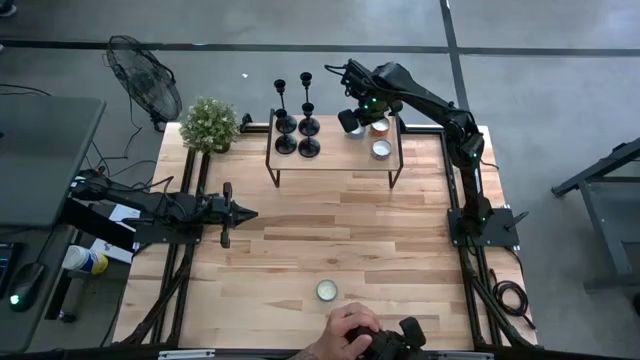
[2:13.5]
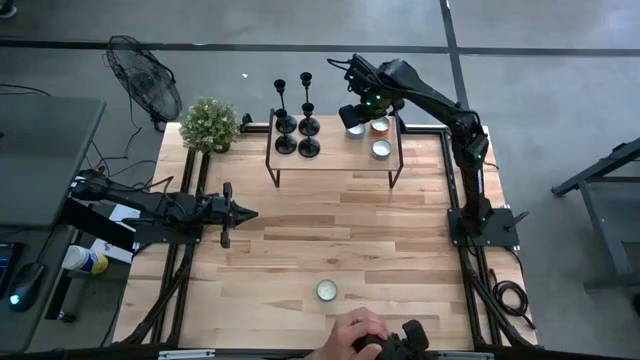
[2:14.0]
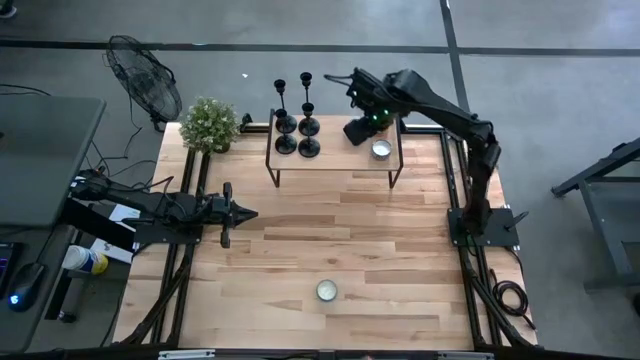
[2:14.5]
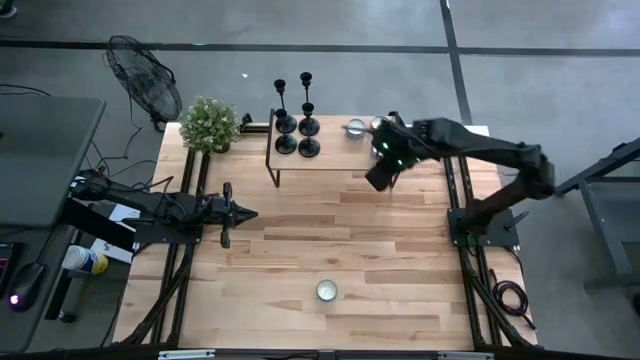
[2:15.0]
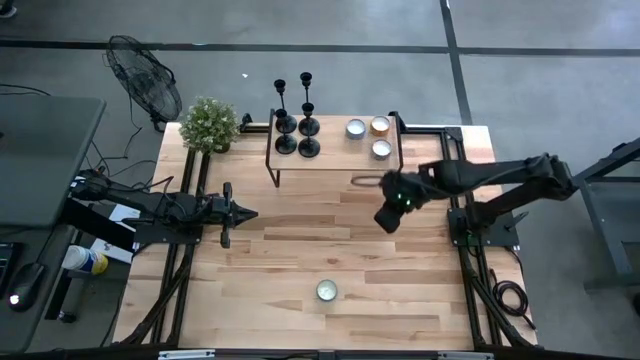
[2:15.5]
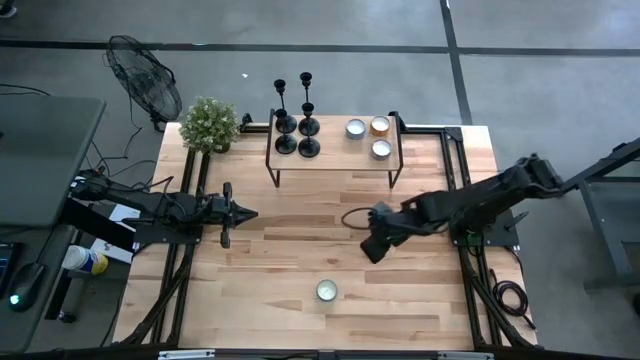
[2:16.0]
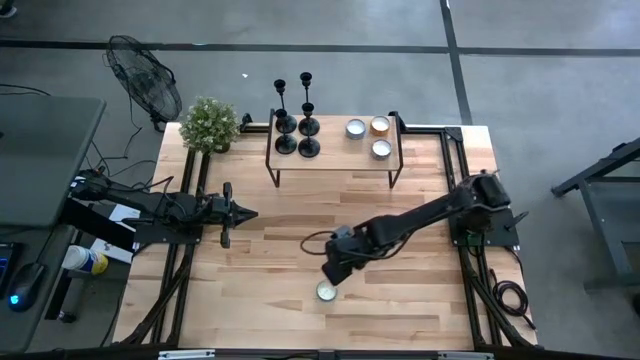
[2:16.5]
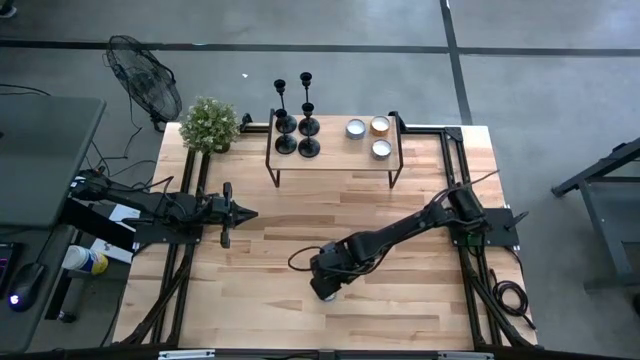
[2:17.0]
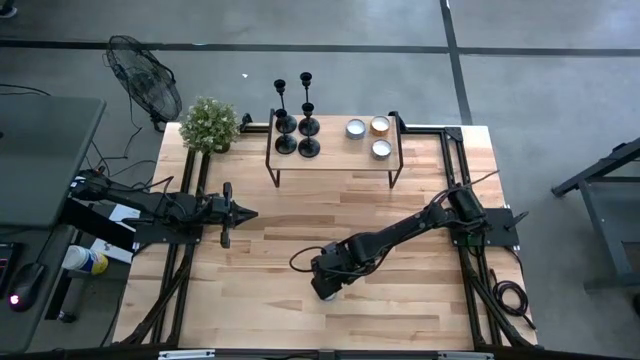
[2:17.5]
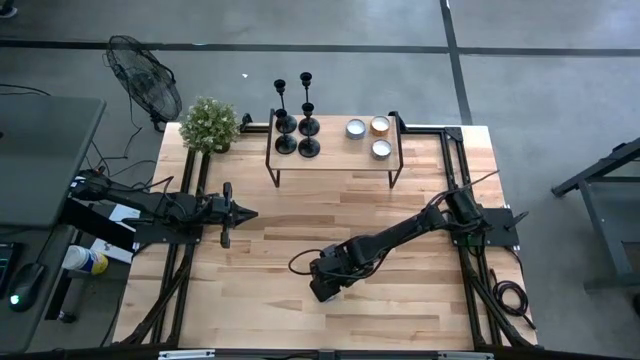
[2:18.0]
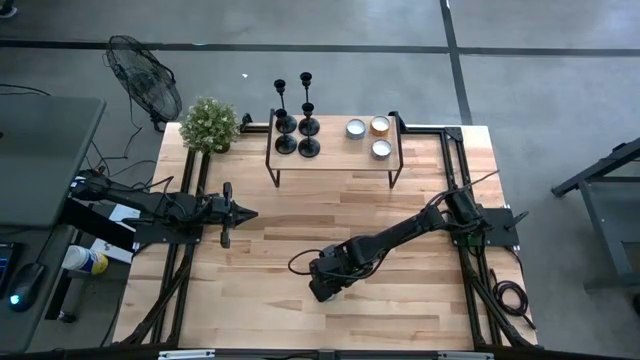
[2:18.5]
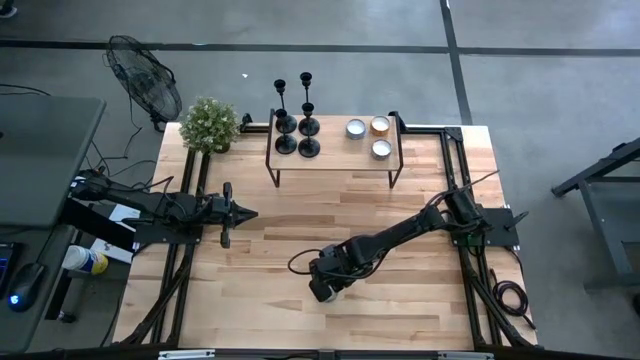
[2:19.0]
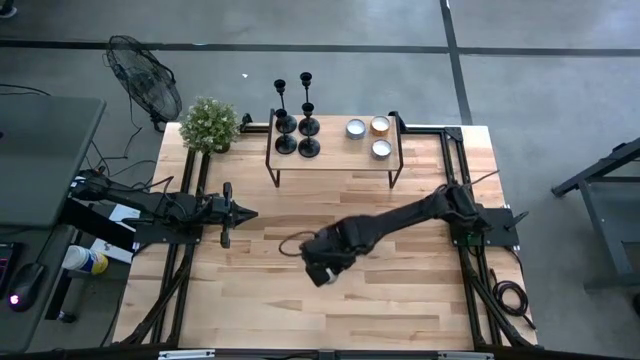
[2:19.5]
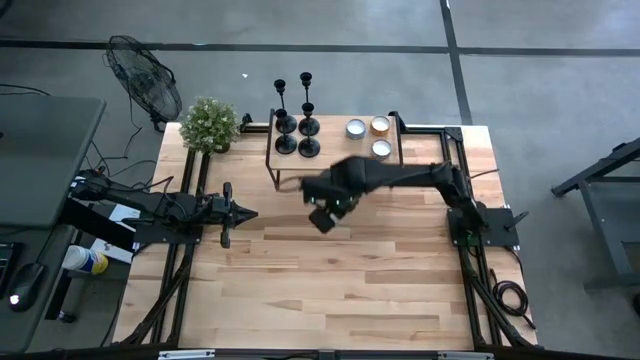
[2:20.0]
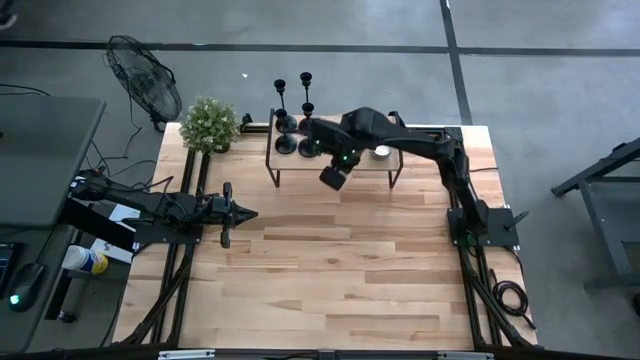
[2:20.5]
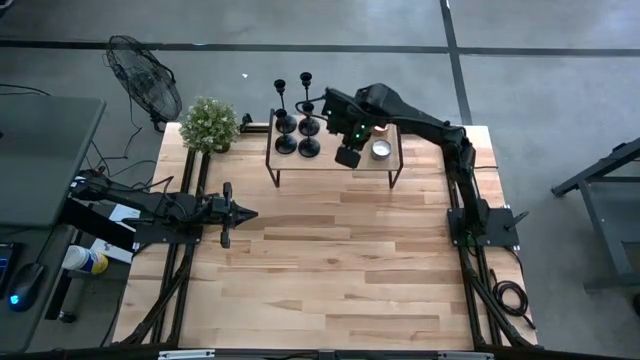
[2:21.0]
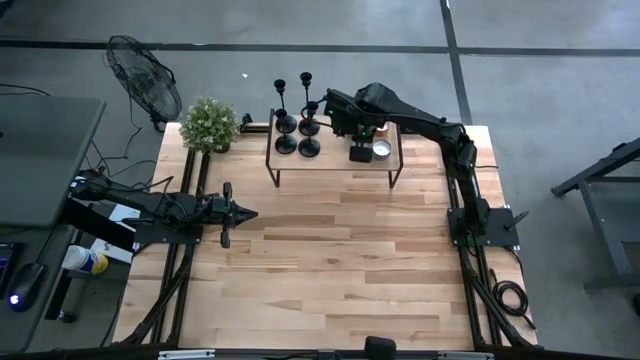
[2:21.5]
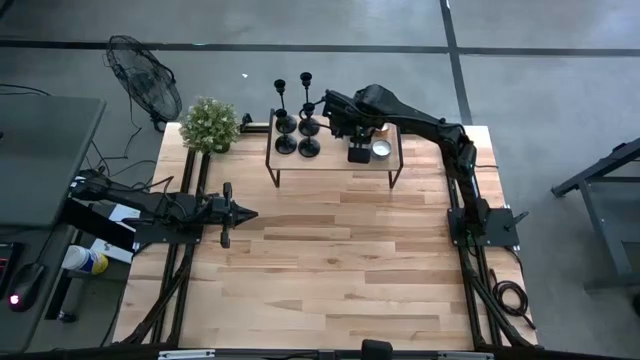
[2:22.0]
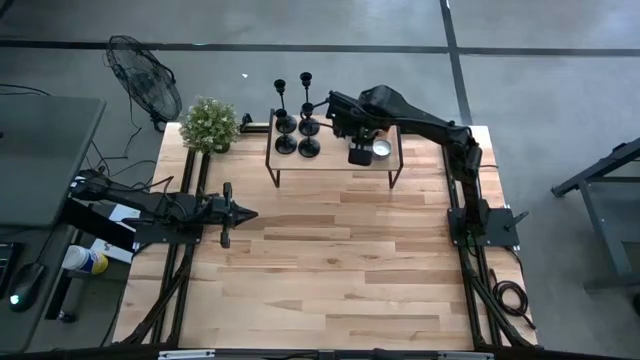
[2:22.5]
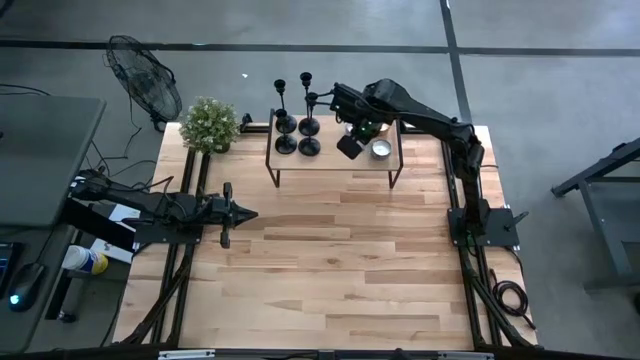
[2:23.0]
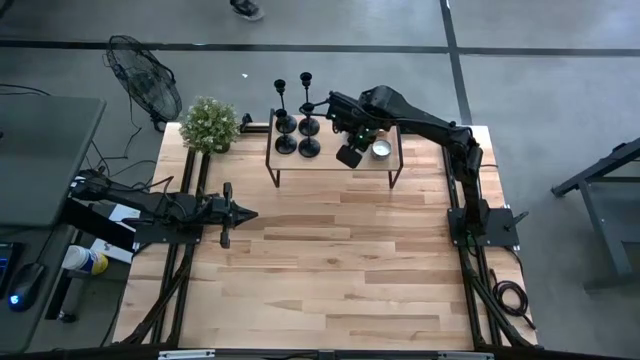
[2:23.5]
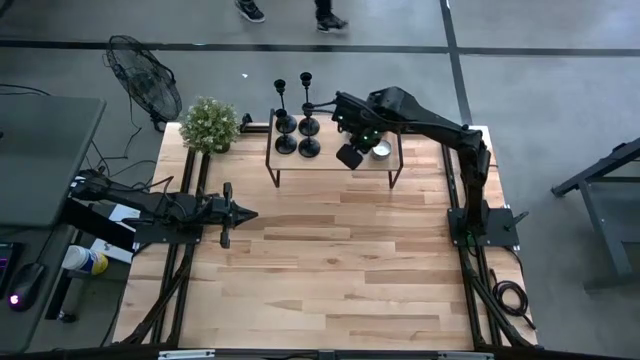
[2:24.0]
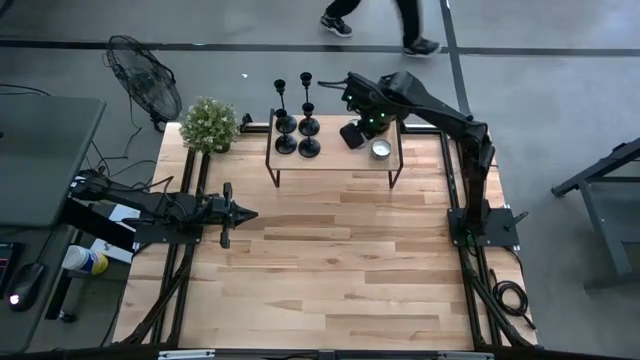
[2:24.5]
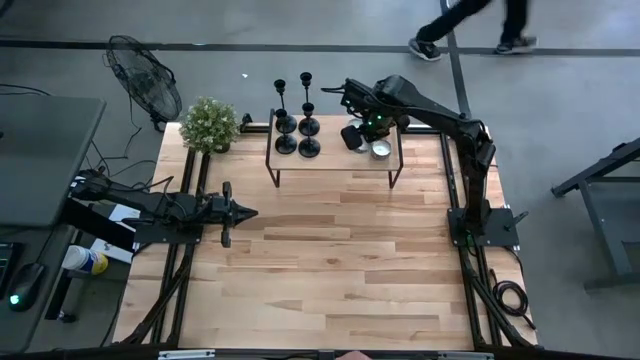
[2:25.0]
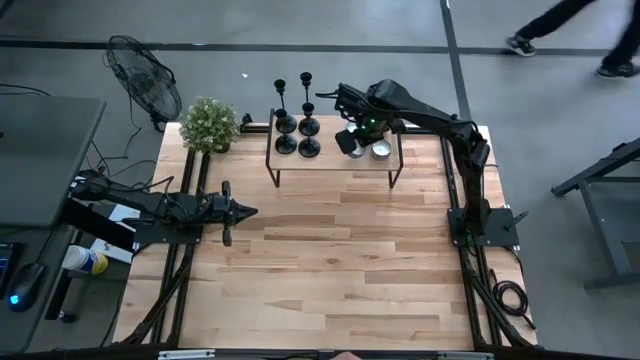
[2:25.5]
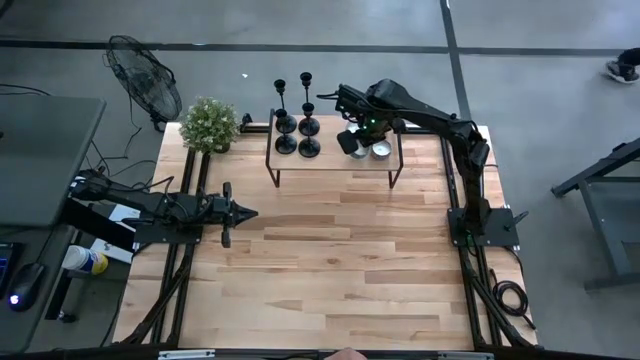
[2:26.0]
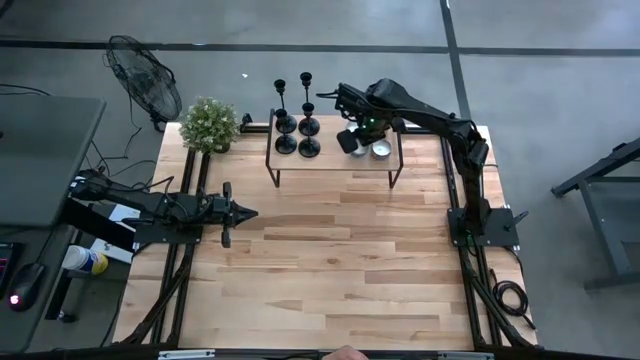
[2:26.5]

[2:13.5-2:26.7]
Task: Pick & Place candle stick holders
Put the blue scented candle on the shelf

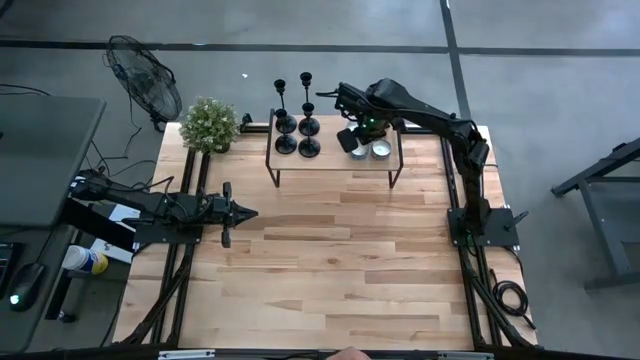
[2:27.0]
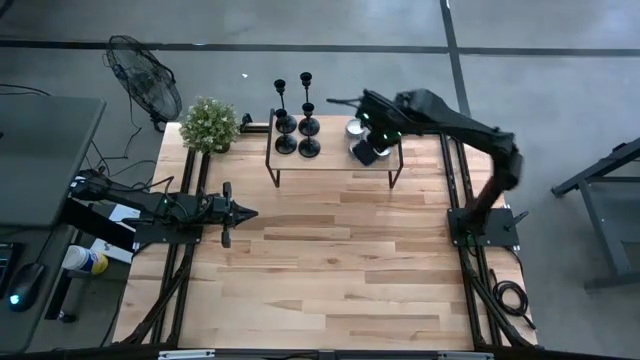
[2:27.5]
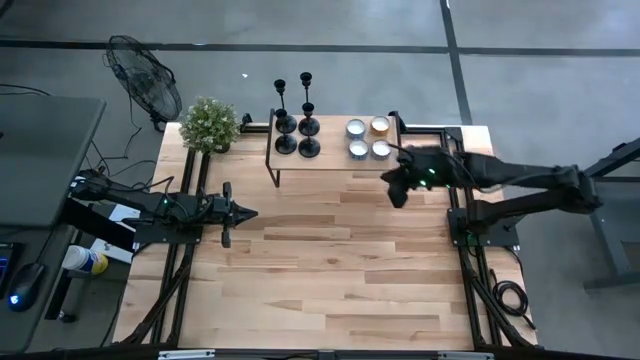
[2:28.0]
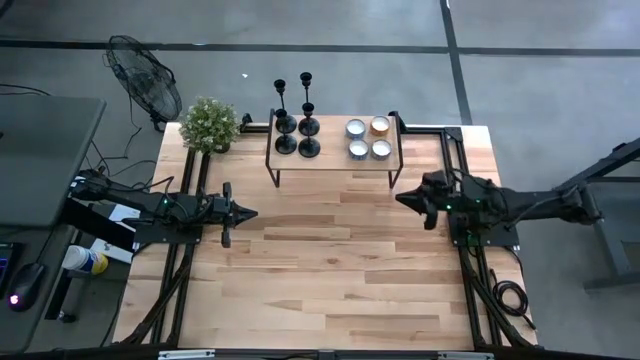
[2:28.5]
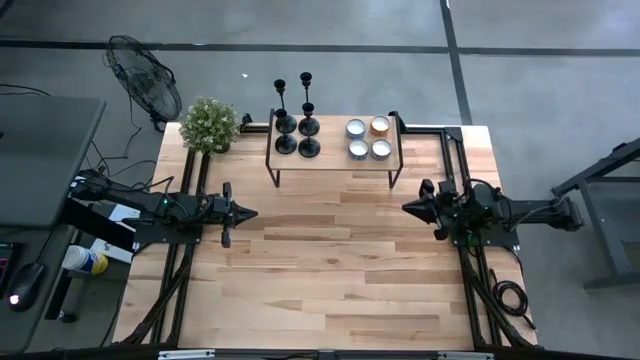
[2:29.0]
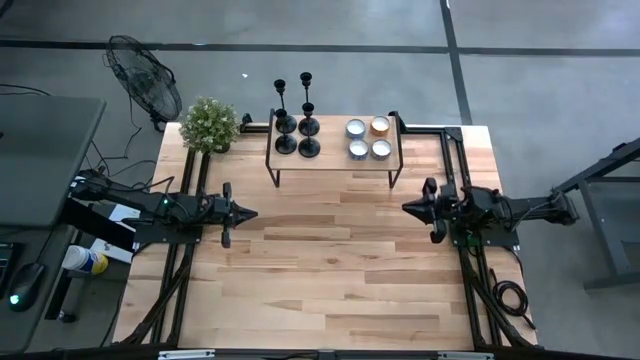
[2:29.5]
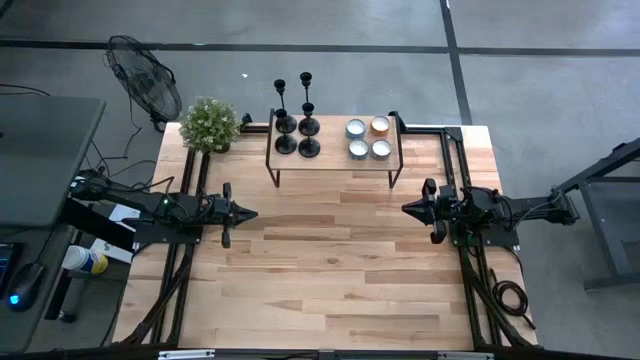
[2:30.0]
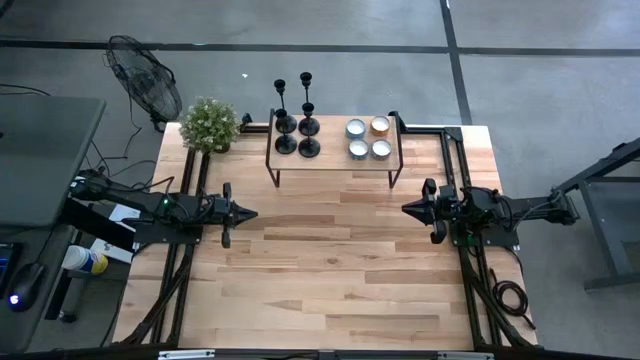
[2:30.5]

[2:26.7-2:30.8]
Return to Home Position

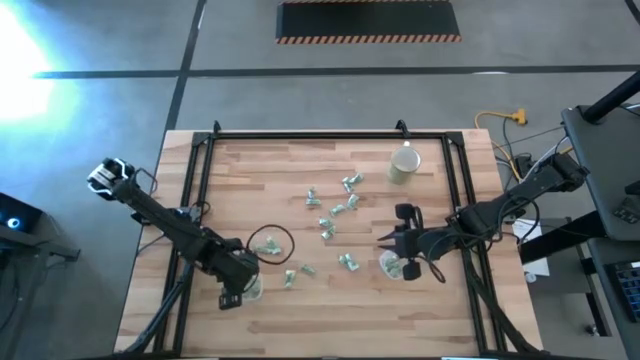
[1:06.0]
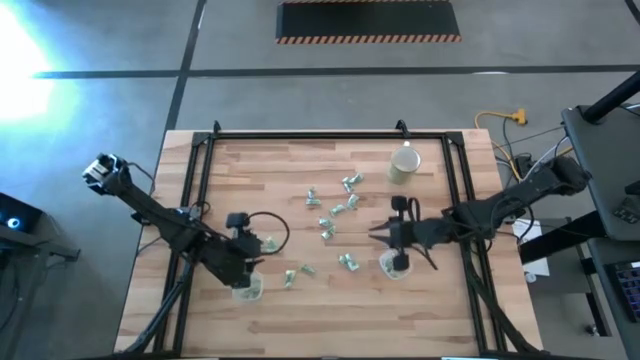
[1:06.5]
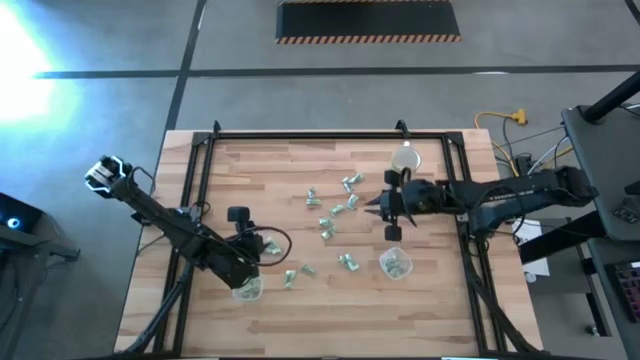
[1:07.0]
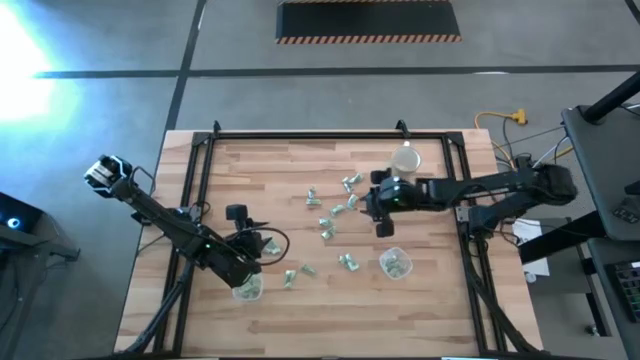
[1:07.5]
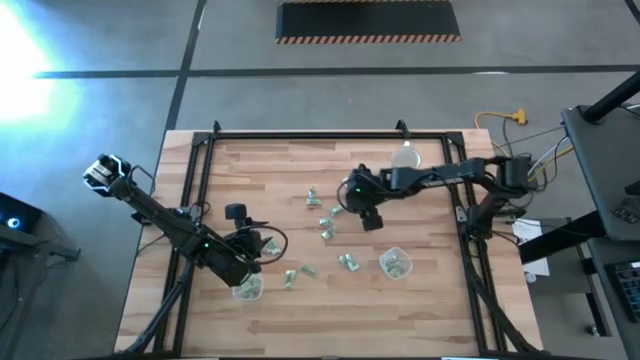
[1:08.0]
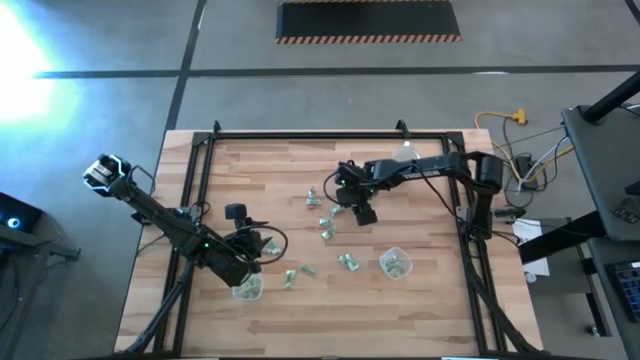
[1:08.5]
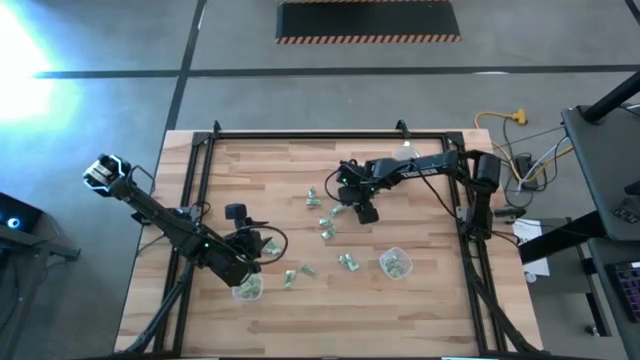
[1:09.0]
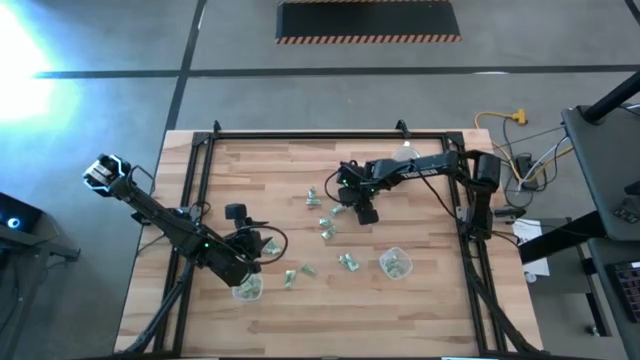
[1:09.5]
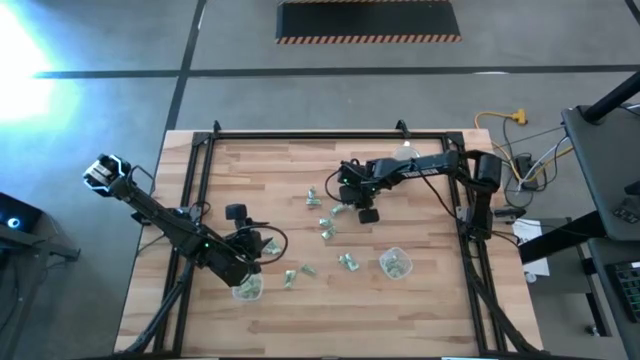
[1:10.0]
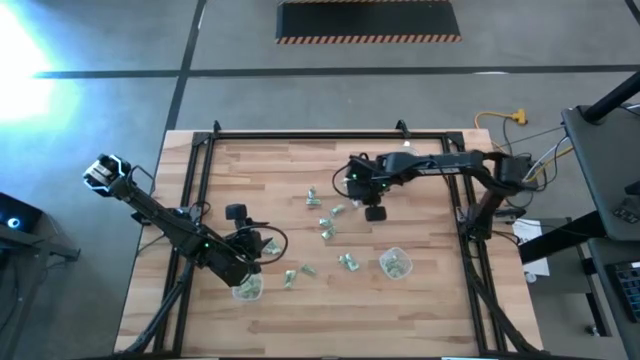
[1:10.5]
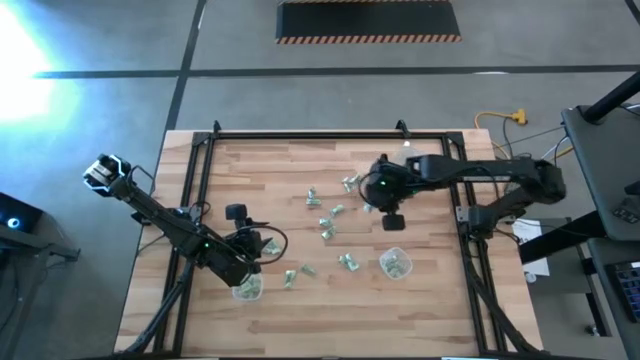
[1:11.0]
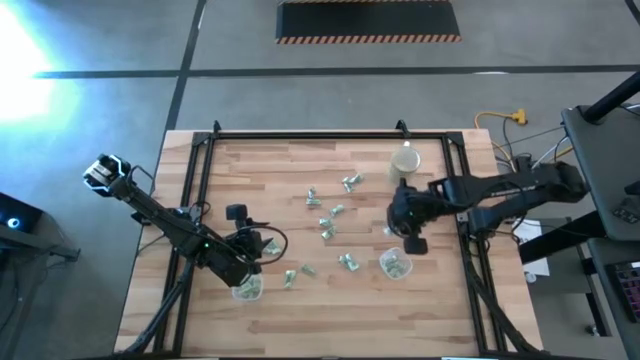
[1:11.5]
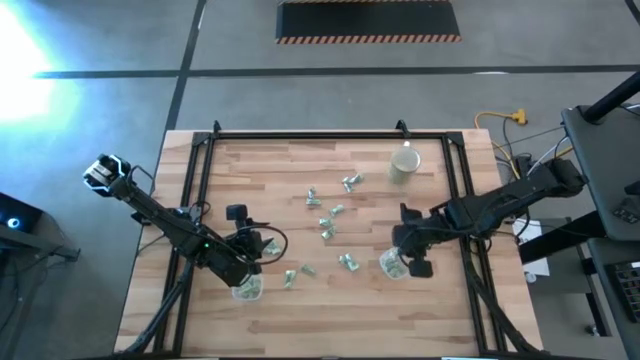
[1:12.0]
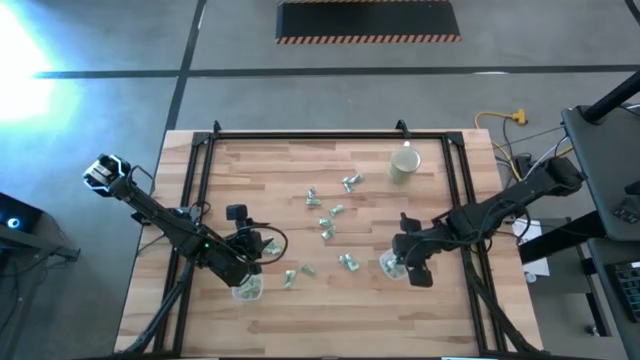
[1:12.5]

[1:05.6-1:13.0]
Task: Pick and place Stevia / Truvia into bins
Put the stevia packet into the right transparent container
